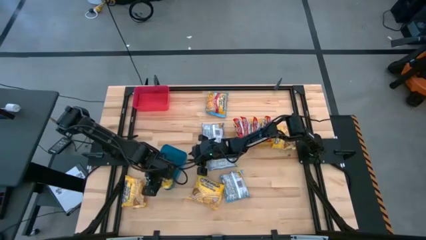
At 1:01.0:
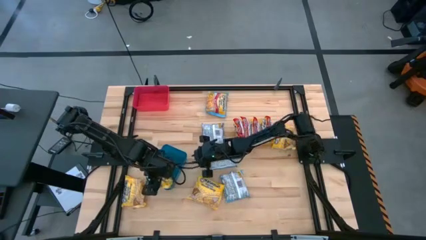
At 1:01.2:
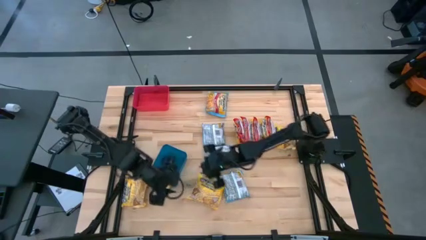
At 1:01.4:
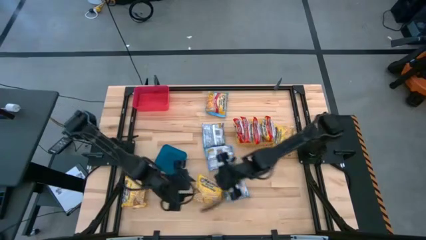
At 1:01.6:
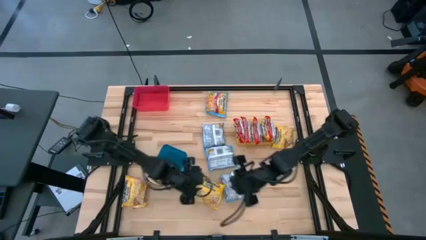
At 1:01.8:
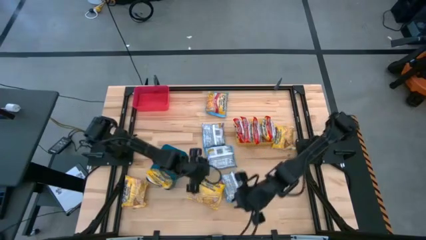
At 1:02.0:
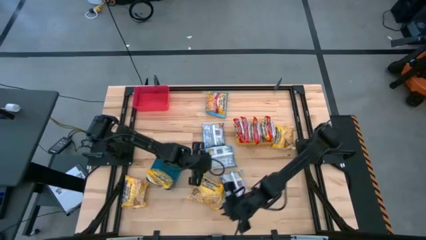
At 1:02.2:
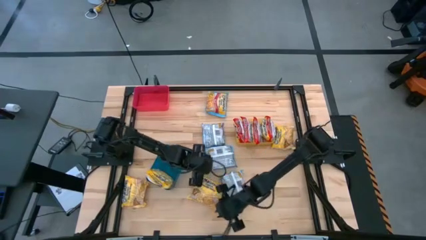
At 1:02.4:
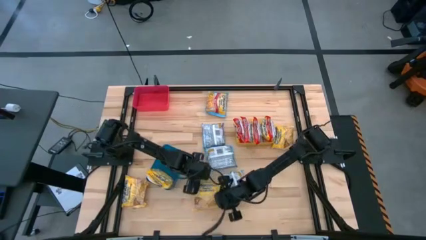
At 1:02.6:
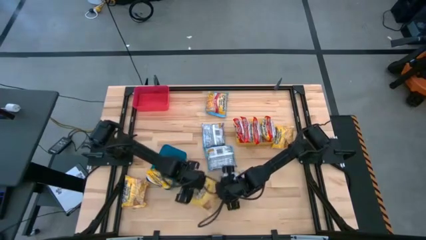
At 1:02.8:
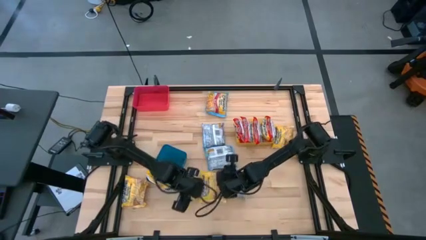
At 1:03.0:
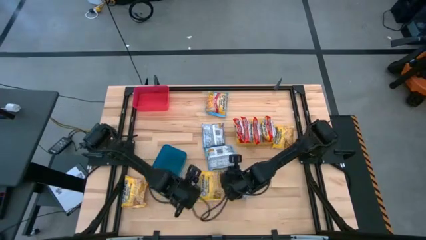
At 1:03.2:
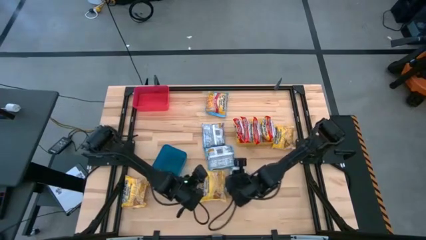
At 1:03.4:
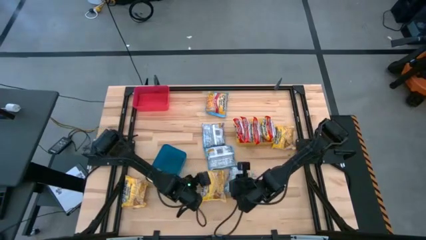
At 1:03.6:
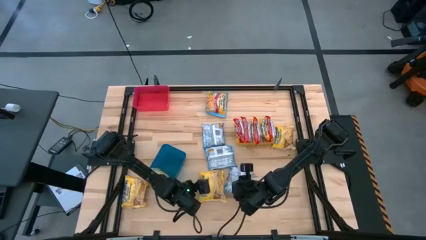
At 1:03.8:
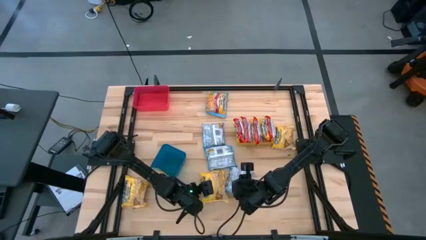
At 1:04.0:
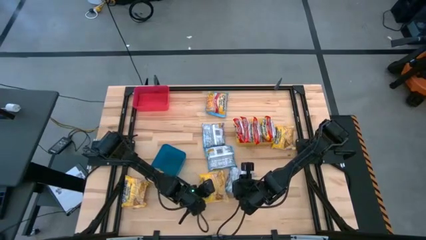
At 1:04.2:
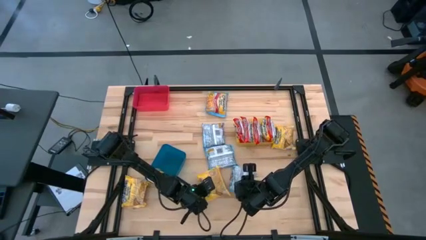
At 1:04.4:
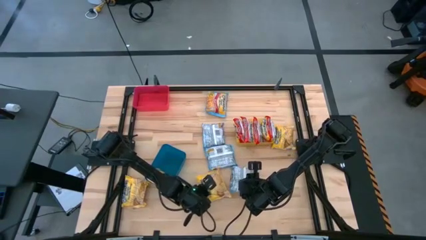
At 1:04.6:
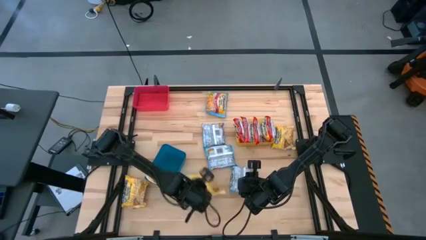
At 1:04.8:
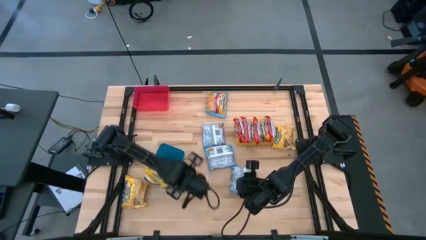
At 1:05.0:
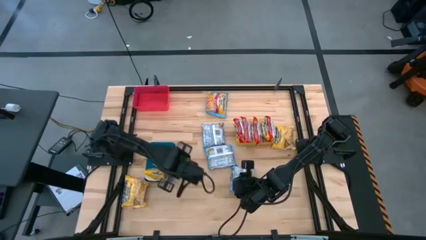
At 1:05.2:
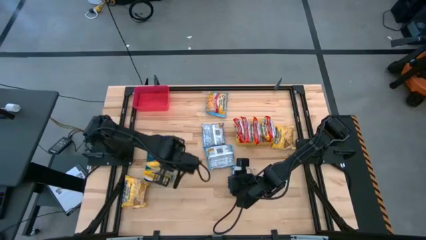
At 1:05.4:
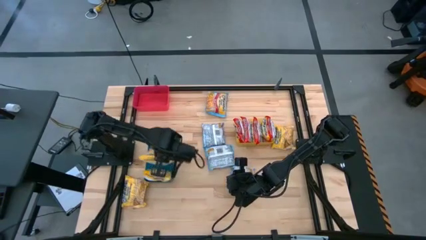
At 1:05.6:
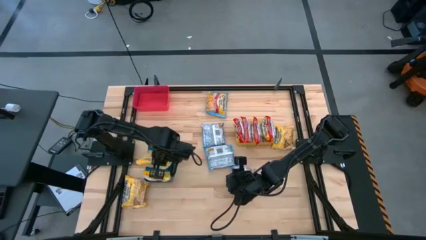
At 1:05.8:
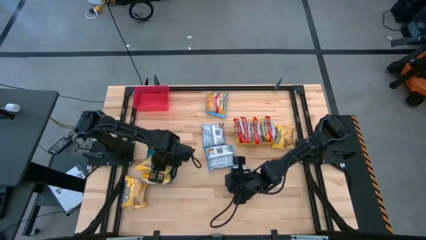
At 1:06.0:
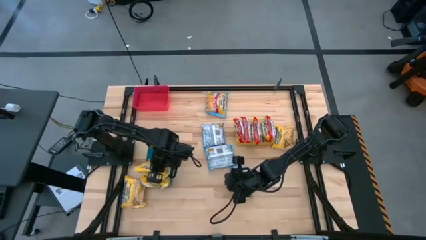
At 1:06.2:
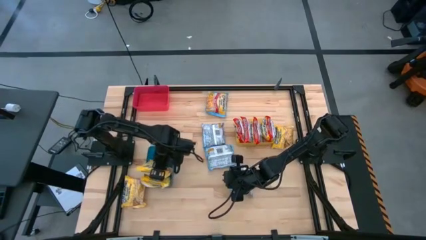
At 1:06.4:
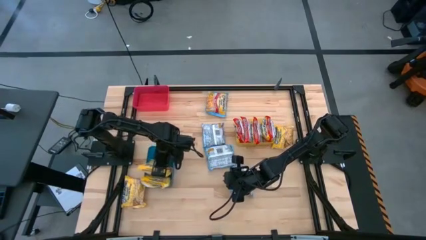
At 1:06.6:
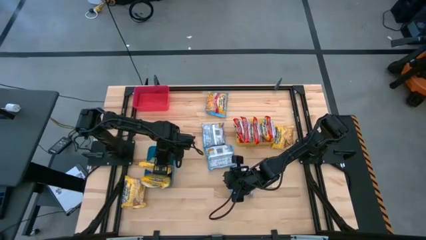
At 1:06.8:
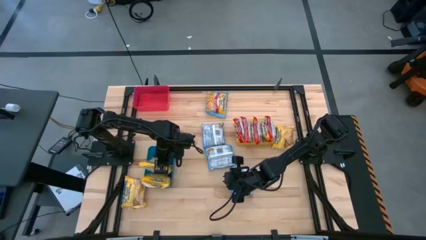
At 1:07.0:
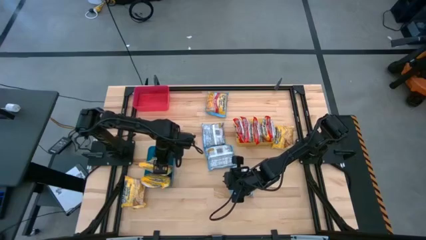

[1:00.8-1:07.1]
Task: Sort Maruchan noodles
Put the yellow noodle pack into the blue bin

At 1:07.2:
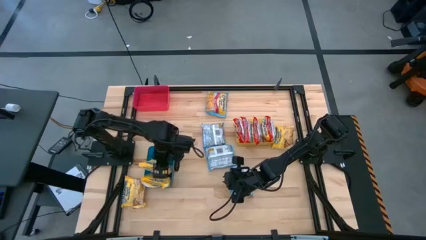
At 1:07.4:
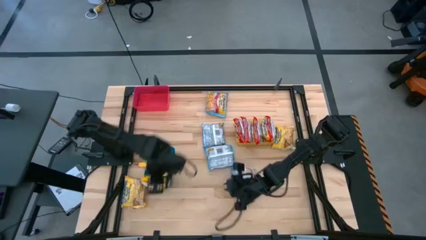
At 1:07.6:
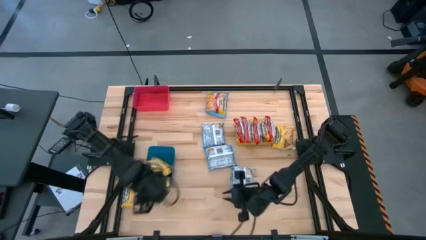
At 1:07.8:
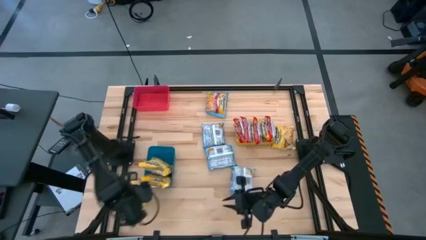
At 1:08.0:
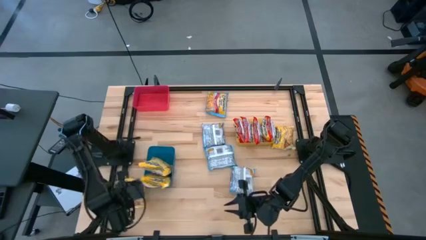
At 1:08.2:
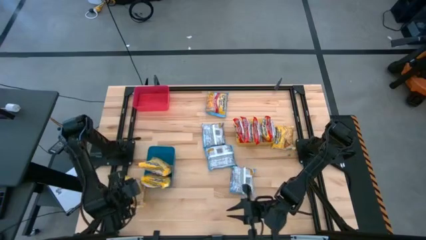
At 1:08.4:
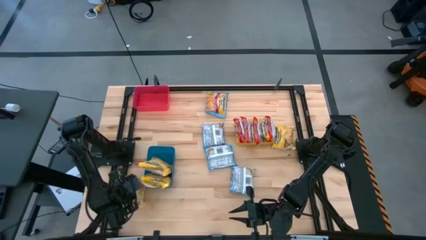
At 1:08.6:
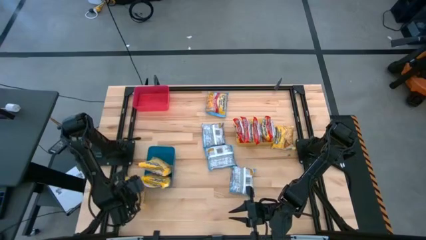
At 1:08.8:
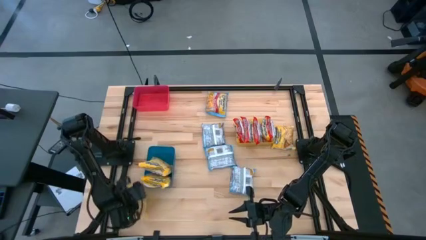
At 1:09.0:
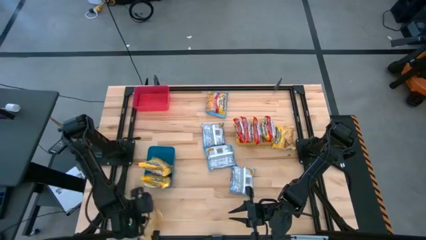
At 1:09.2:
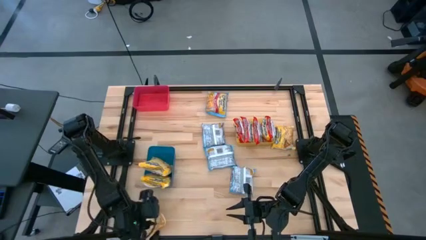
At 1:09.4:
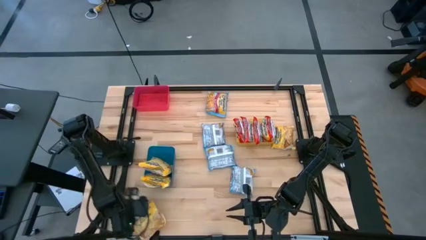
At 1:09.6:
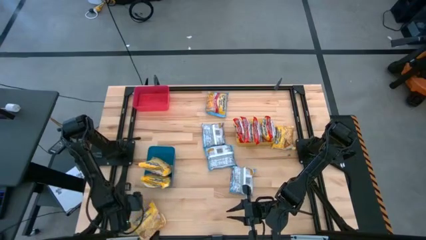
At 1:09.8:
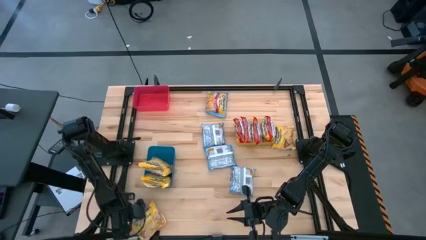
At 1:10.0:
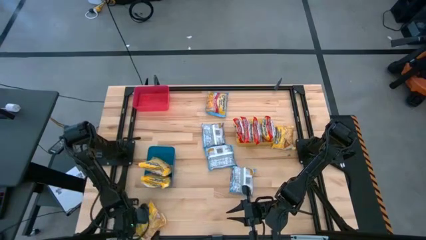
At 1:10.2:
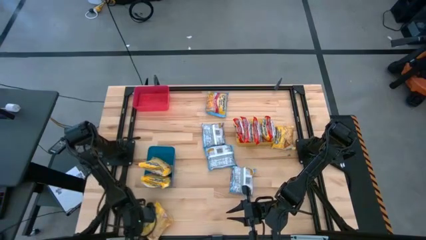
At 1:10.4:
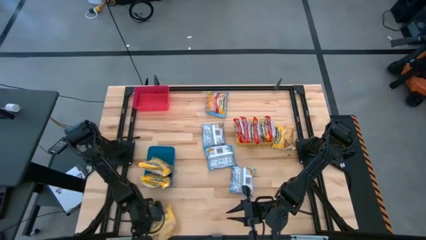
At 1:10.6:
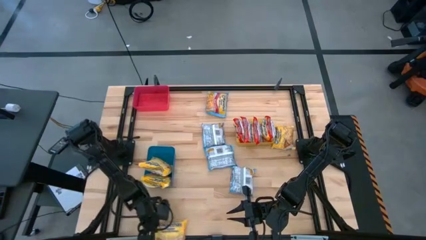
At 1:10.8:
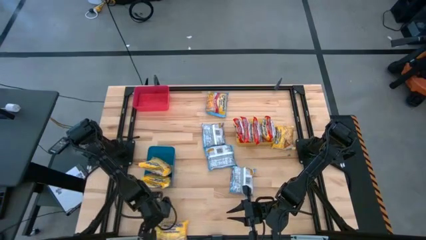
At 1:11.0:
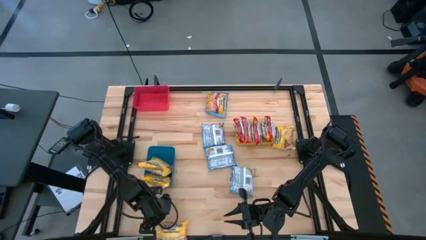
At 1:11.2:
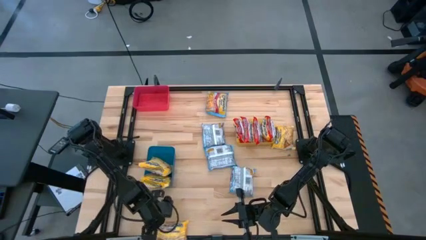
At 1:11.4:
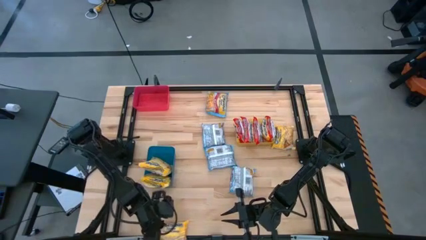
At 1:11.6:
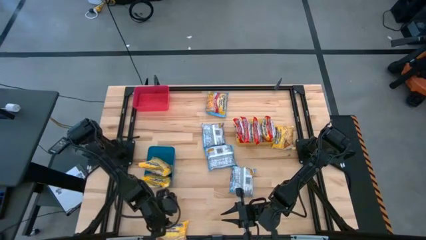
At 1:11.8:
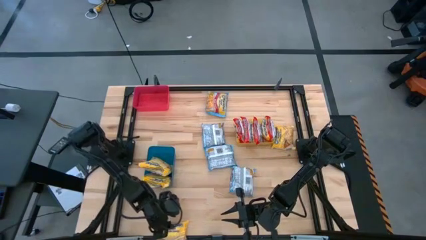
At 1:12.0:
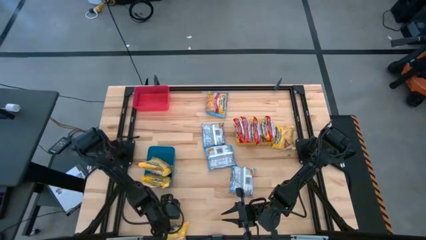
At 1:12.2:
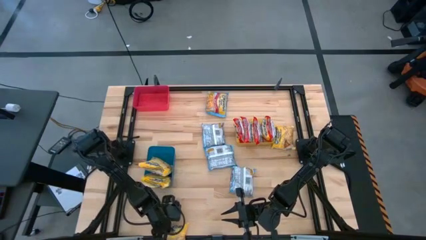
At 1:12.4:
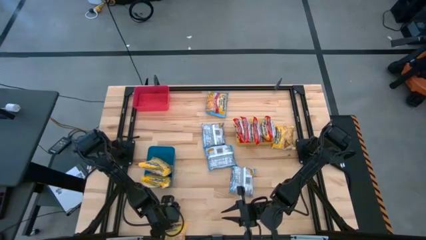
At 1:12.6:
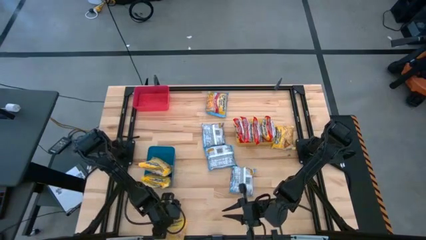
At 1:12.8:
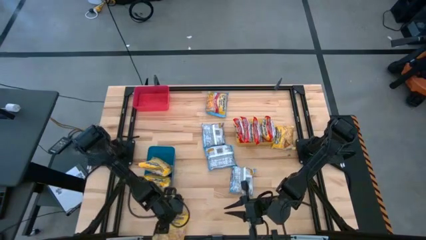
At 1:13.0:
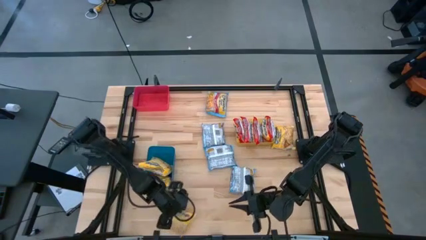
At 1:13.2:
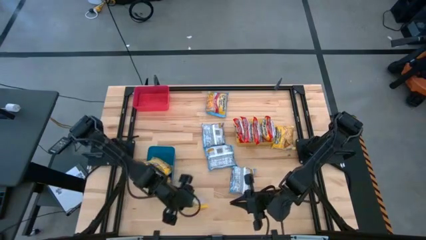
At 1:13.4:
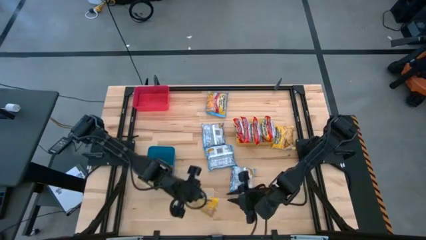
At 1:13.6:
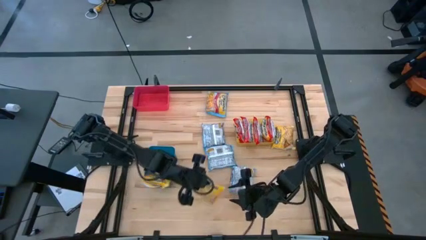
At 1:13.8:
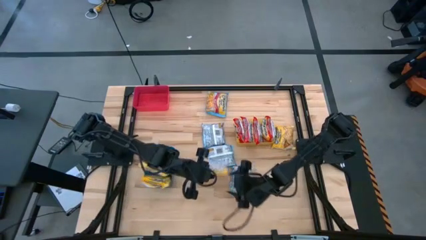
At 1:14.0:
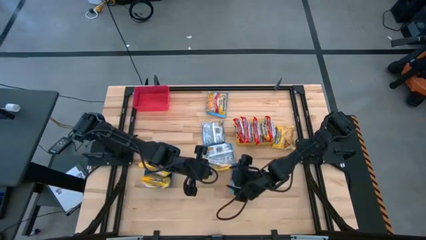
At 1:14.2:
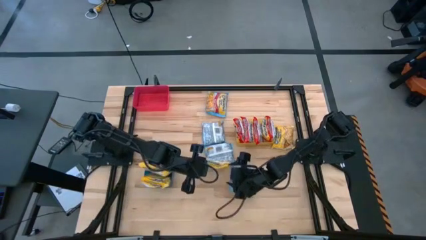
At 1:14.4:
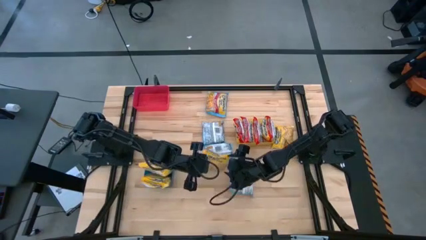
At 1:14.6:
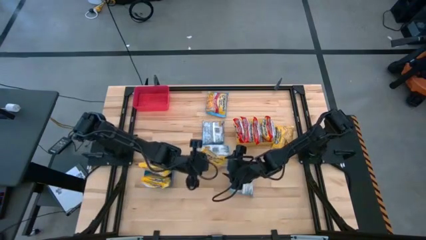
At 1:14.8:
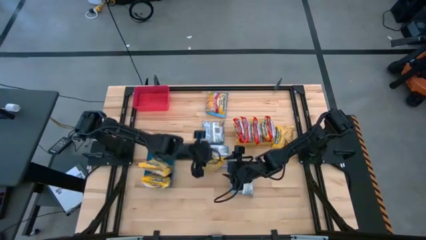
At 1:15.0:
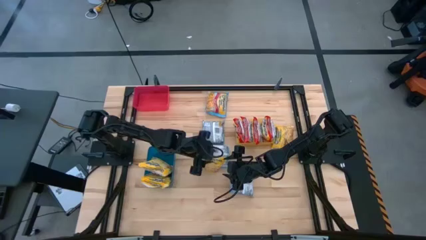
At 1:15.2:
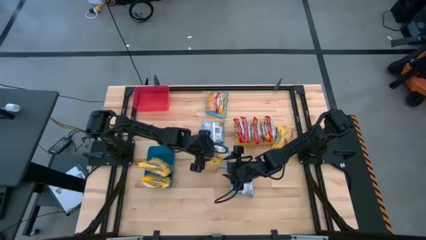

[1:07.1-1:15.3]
Put the yellow noodle pack into the blue bin

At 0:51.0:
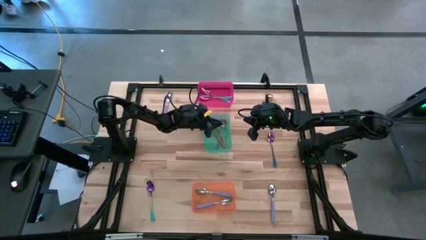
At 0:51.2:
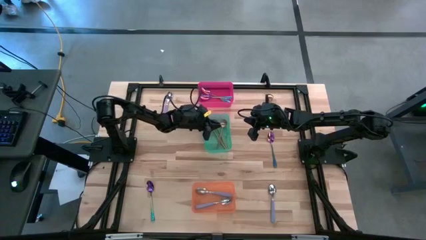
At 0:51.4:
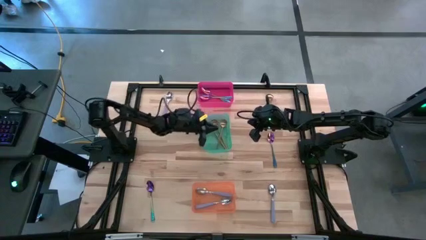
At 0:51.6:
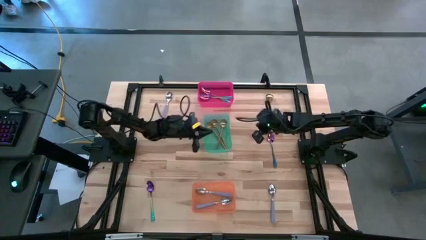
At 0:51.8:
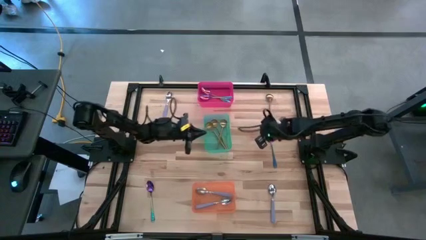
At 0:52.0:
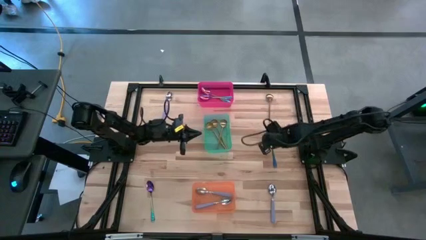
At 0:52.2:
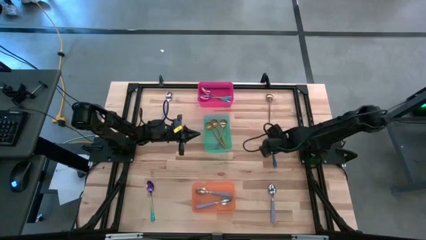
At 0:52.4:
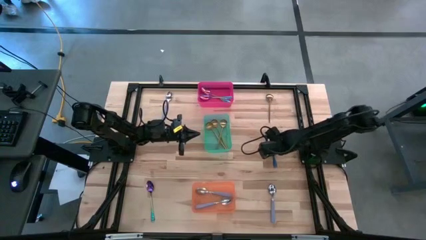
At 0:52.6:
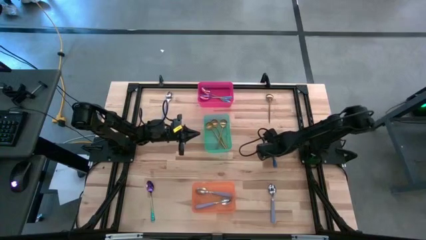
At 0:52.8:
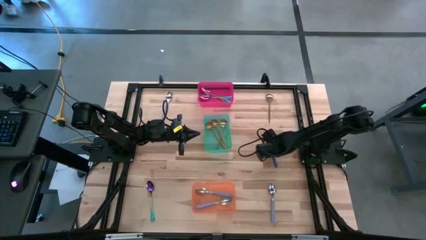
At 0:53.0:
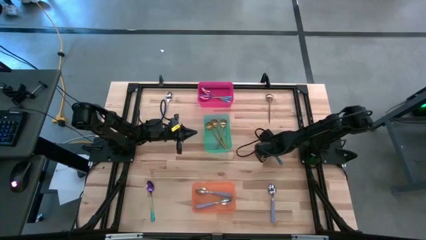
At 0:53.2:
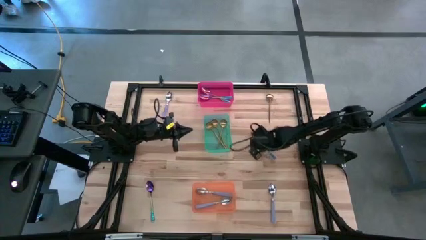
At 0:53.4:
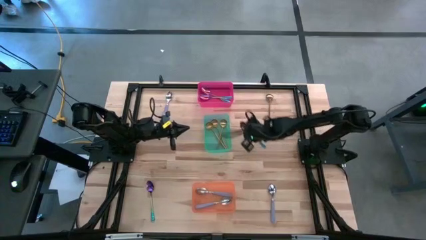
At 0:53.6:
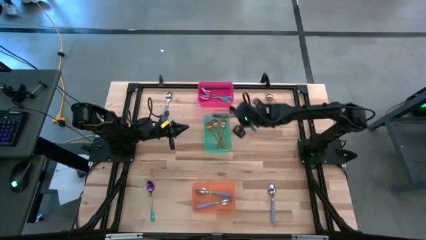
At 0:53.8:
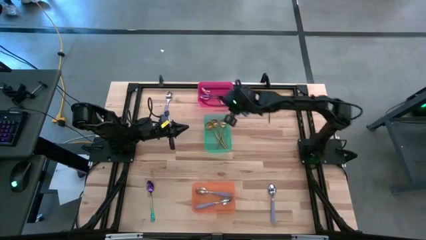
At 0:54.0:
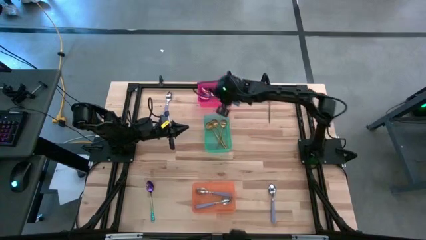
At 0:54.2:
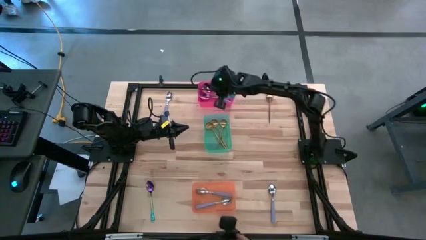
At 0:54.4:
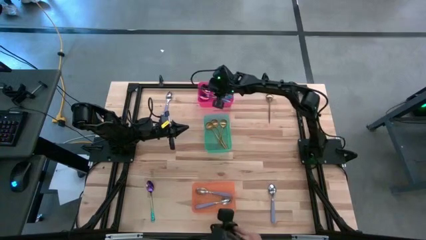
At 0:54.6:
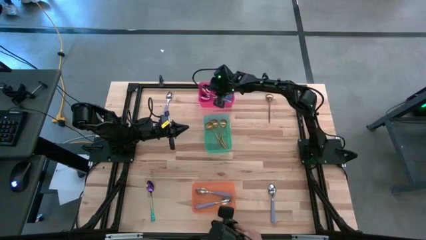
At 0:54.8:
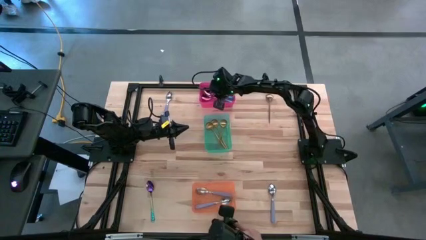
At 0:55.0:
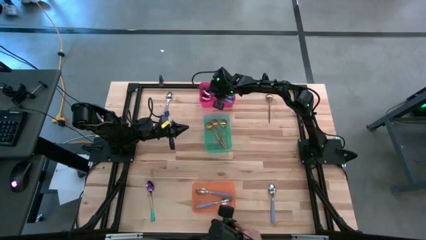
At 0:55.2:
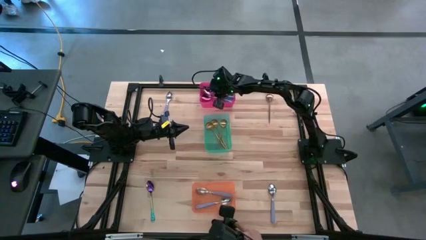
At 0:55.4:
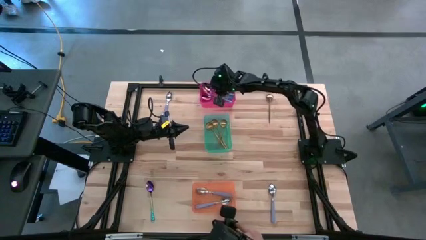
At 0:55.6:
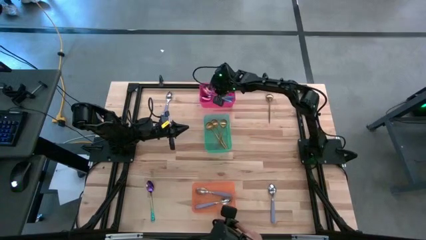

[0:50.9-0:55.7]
Task: Sort silverware by color (type)
Put the blue spoon into the red bin
